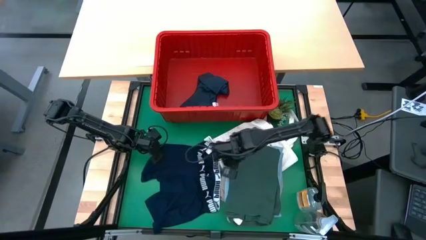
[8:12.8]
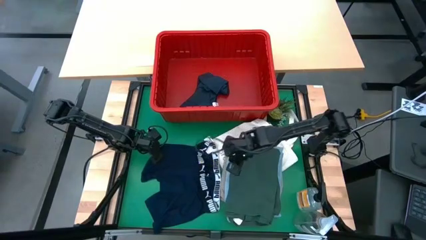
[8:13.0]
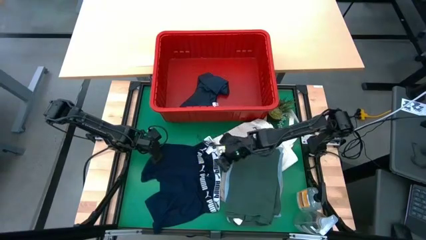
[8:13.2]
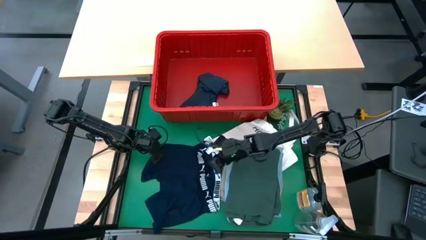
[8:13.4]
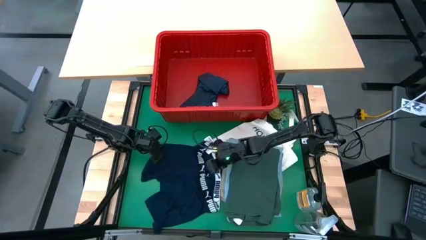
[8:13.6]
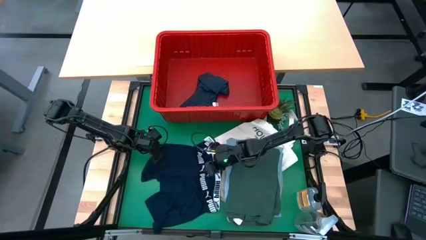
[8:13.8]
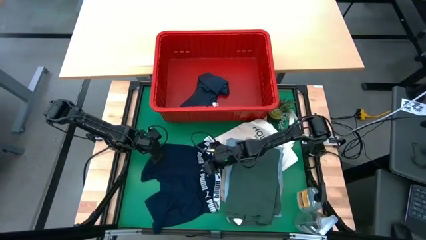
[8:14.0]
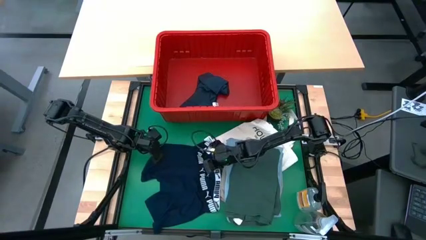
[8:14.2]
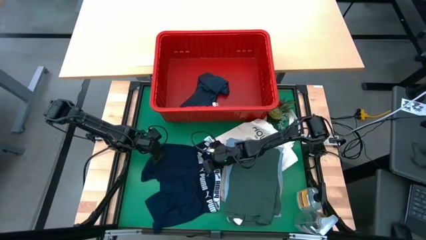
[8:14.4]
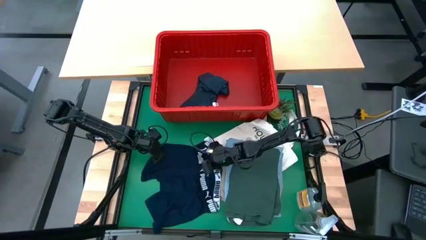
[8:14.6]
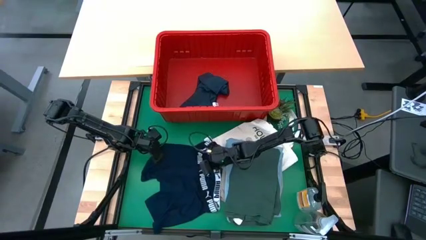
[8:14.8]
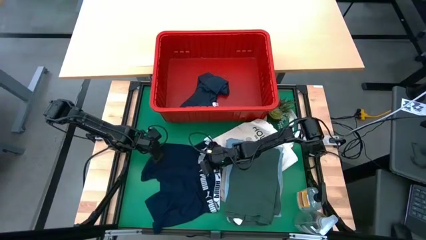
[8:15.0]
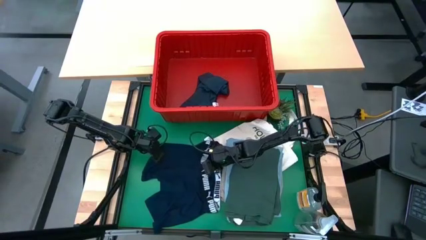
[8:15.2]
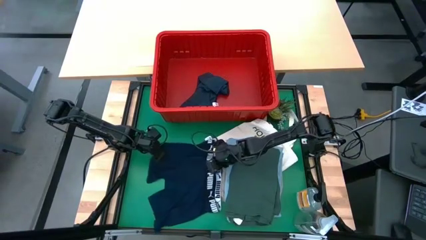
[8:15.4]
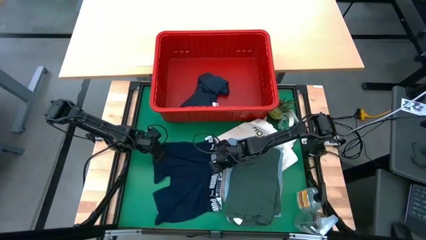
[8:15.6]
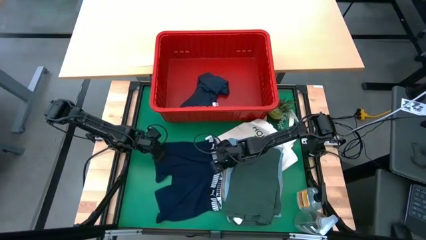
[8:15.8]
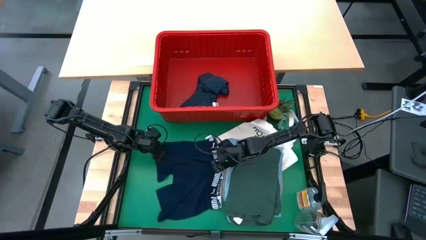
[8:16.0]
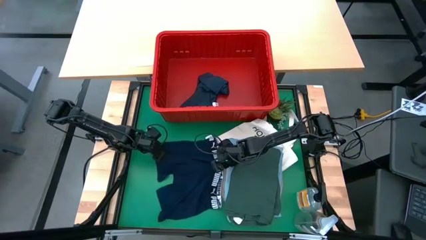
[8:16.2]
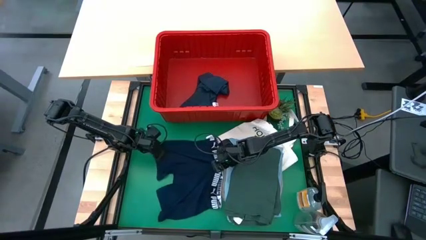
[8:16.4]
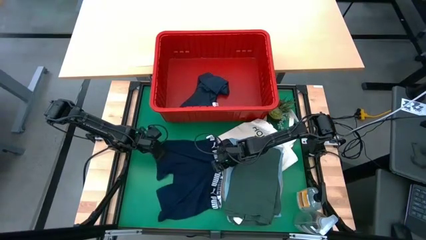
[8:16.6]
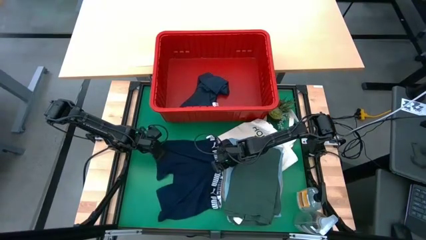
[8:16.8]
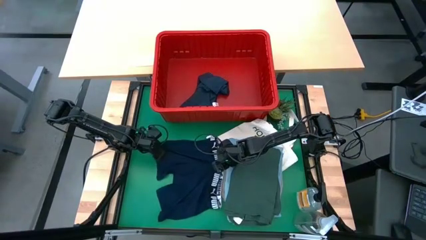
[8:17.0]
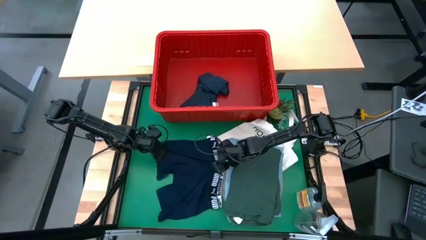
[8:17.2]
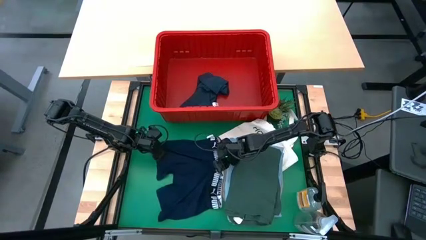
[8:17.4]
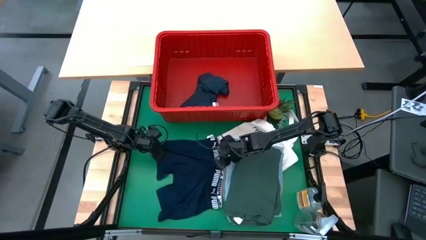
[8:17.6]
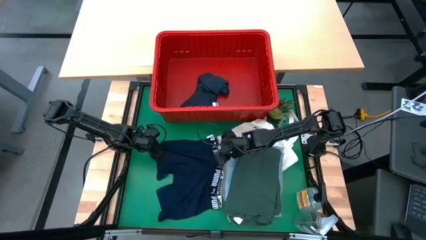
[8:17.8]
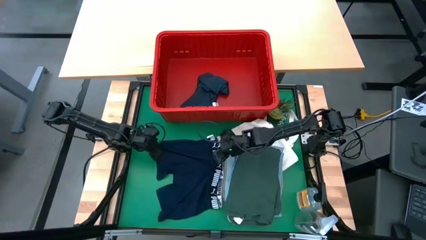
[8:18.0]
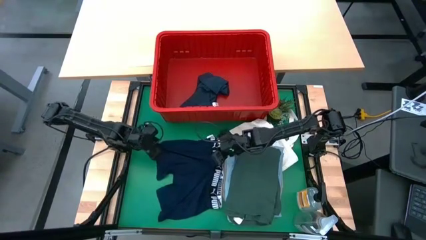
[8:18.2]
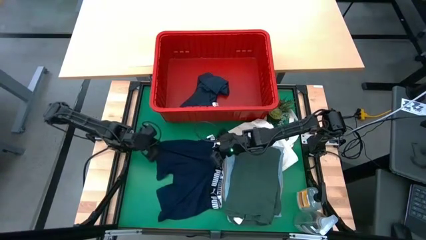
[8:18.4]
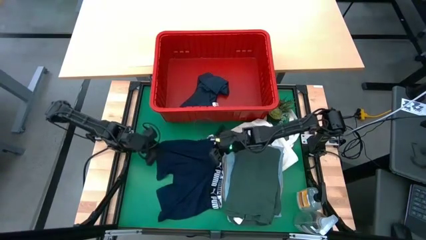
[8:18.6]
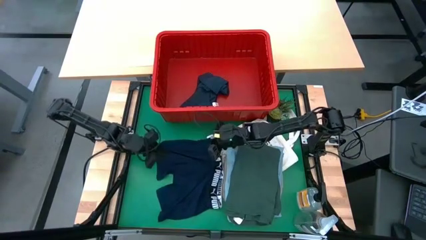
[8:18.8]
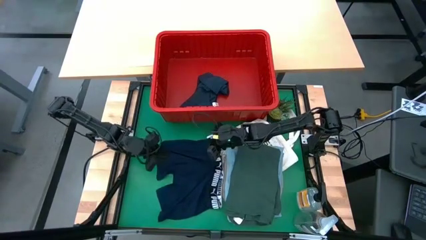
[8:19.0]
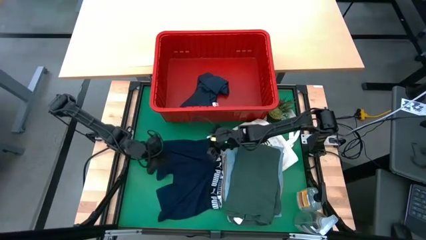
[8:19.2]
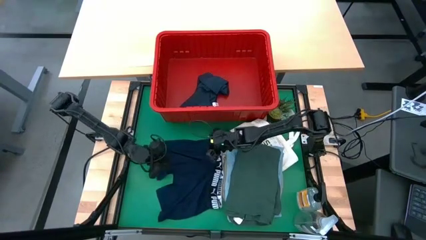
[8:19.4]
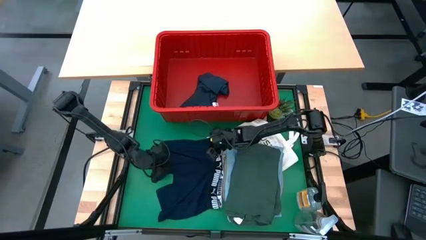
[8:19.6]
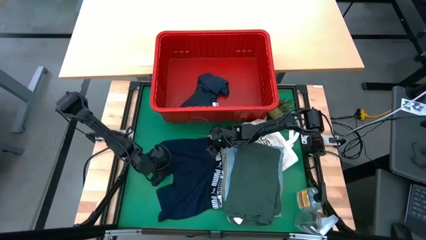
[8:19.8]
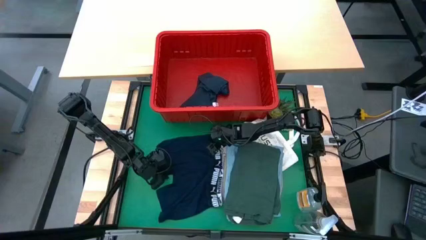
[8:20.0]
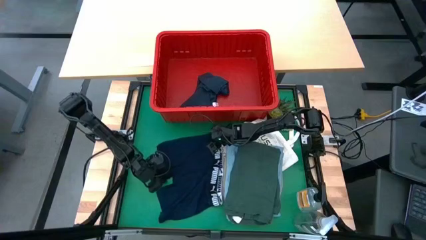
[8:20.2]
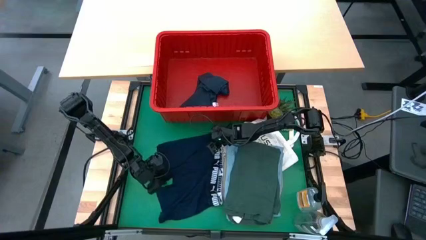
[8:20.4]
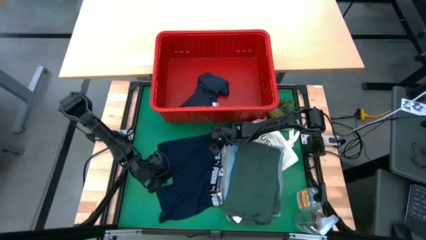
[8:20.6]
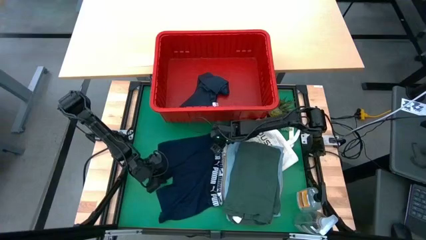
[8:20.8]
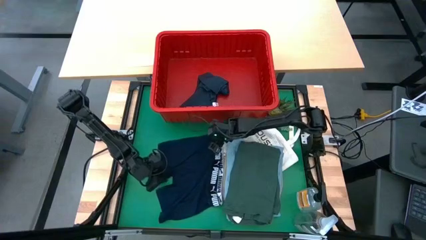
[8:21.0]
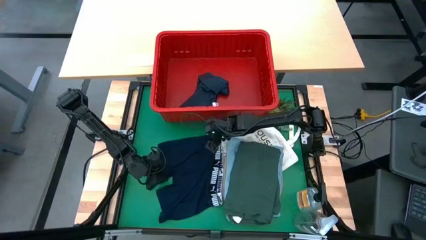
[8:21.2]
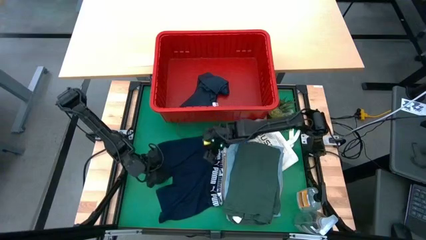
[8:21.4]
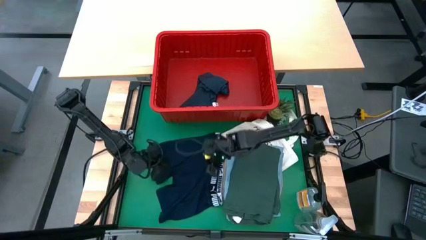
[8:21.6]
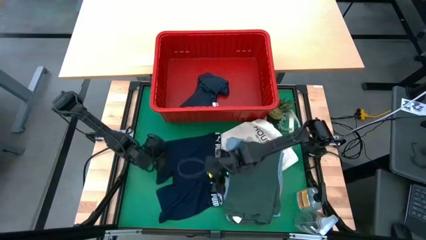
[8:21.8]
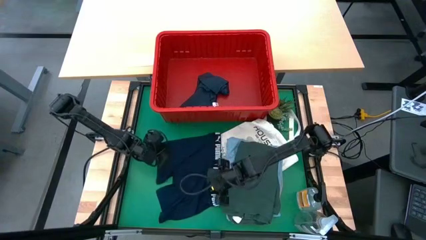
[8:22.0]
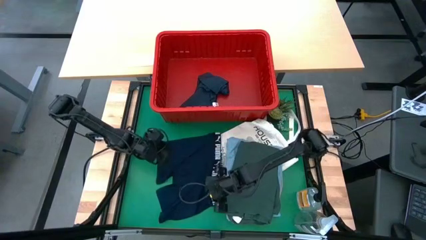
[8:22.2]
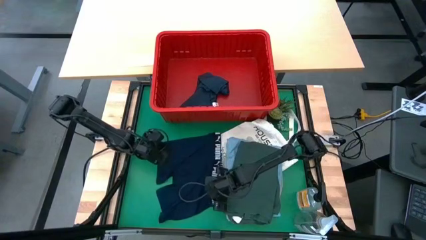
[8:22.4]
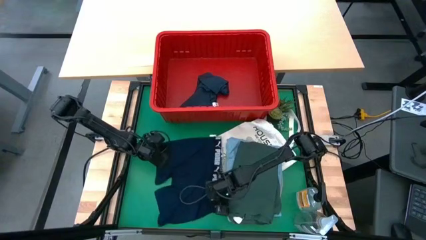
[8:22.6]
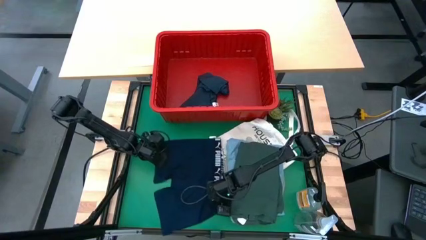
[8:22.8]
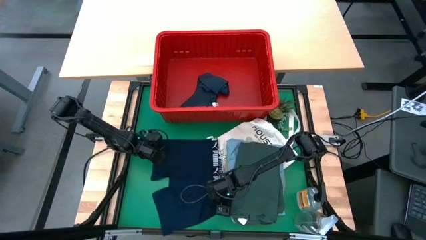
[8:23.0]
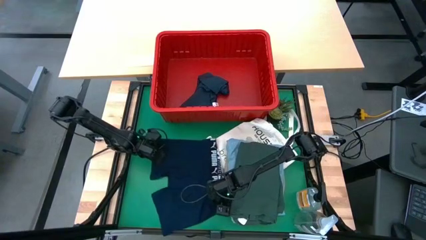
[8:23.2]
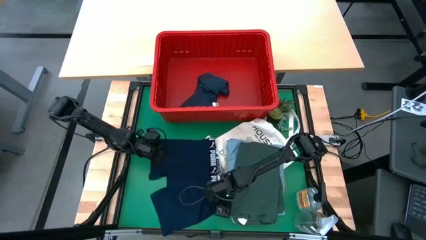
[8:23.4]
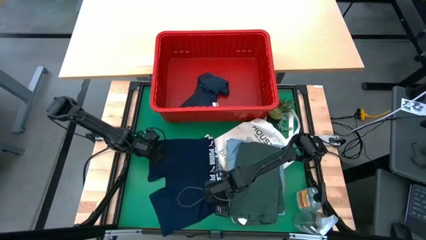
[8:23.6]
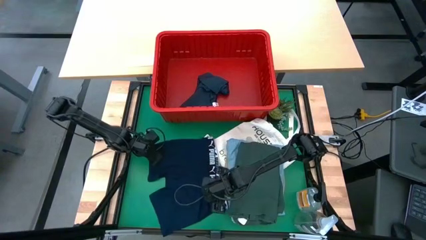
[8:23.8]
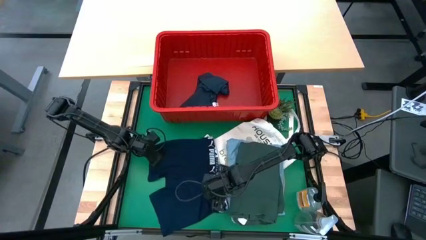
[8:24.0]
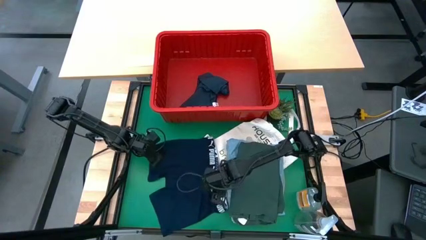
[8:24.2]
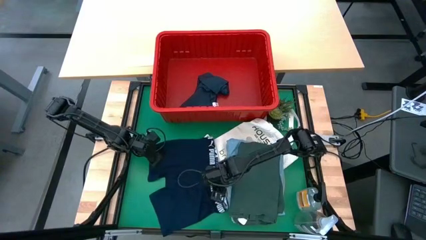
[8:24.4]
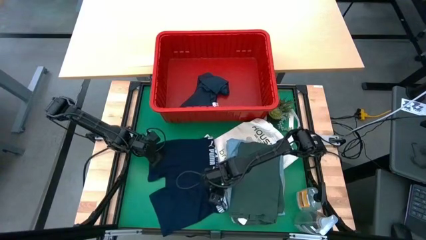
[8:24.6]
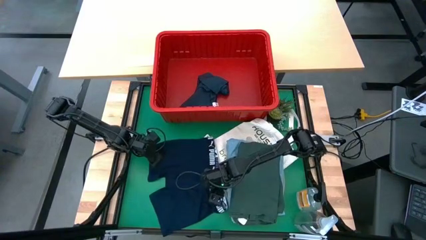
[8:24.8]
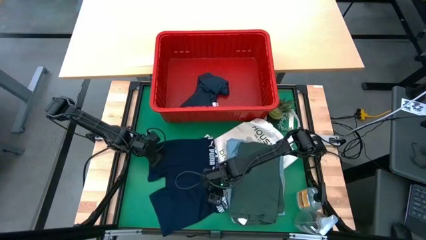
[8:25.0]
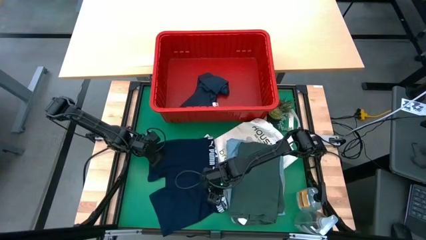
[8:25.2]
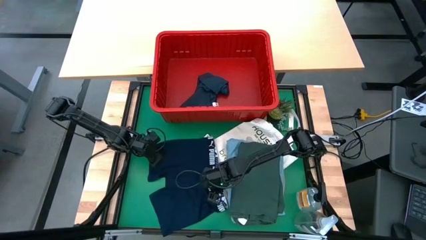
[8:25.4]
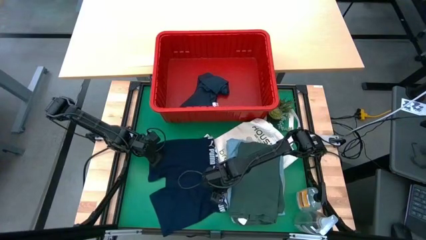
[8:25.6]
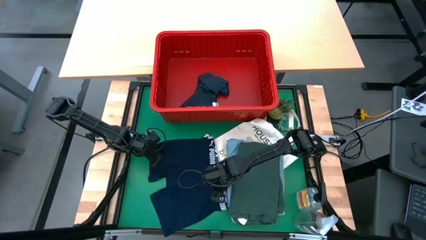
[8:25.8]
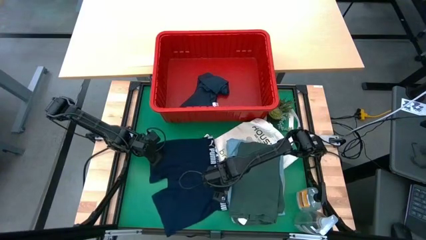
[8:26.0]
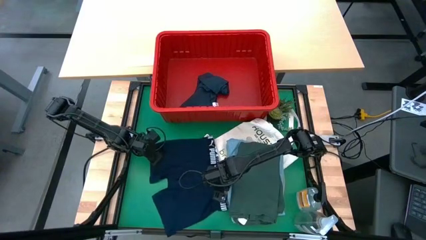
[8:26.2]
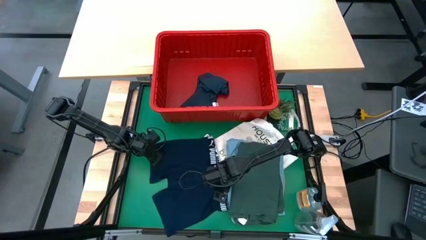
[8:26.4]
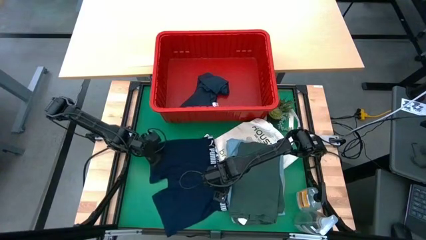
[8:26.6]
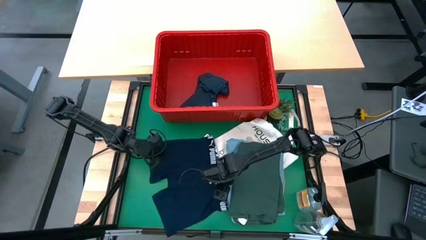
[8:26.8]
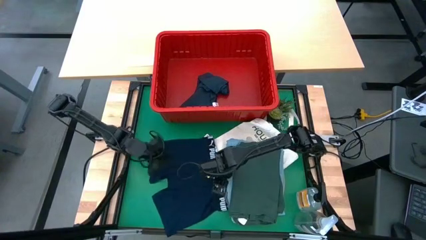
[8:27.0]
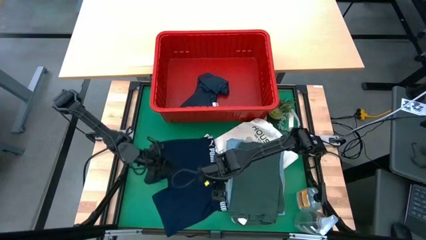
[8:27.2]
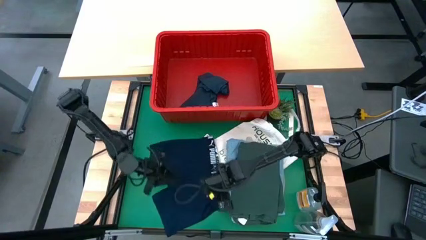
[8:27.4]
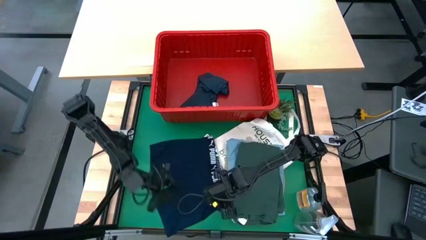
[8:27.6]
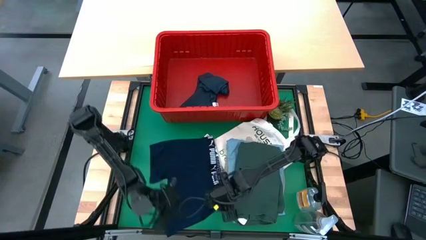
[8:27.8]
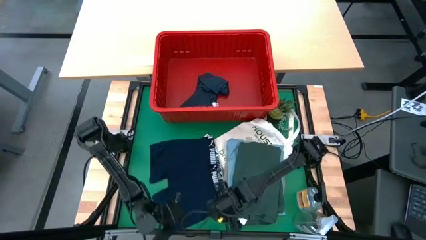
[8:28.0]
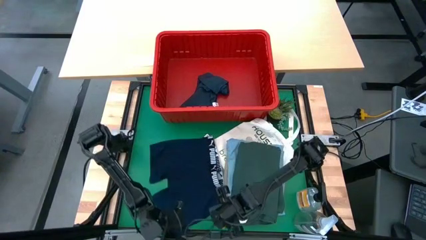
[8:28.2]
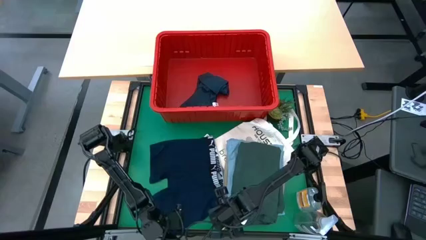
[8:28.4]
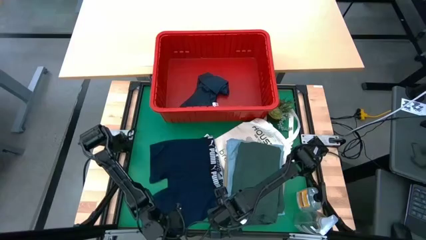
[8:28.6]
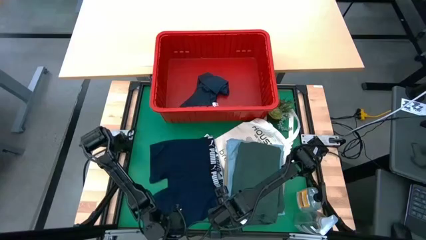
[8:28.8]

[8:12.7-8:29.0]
Task: Fold Laundry from Bin
Fold the dark blue boxer
